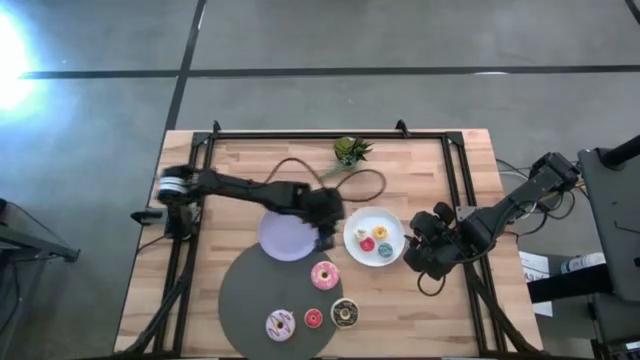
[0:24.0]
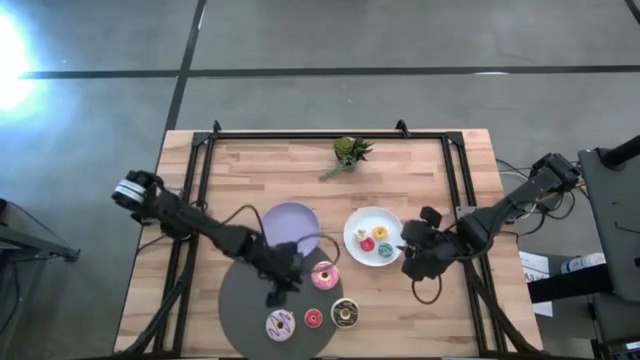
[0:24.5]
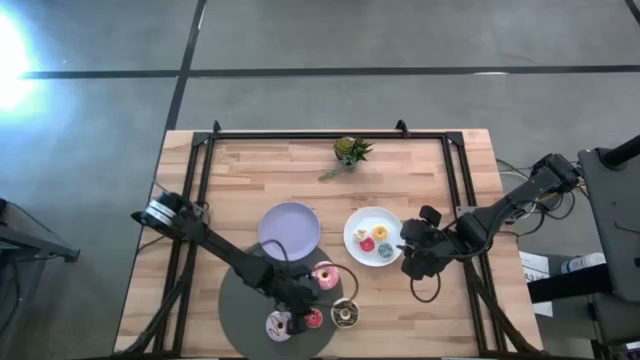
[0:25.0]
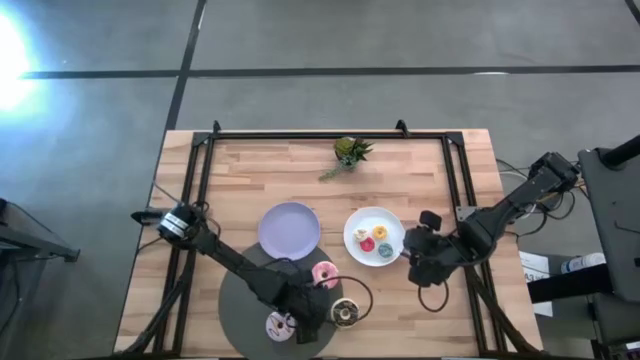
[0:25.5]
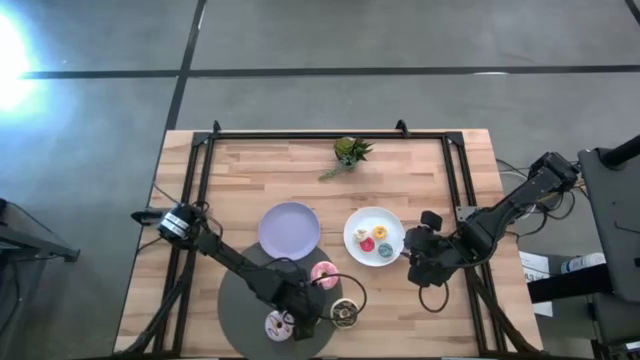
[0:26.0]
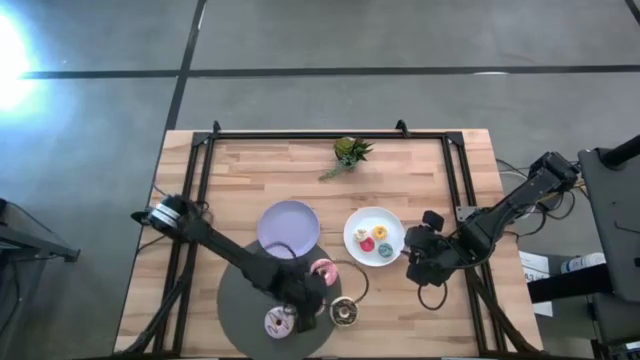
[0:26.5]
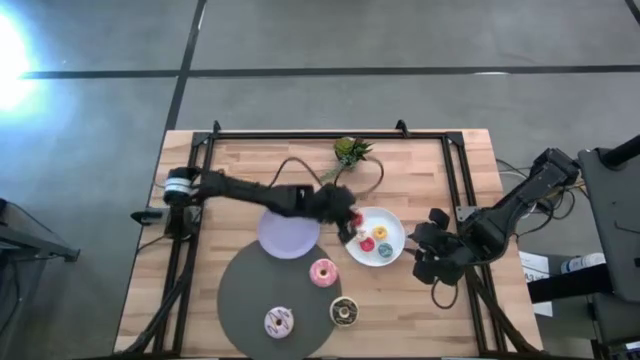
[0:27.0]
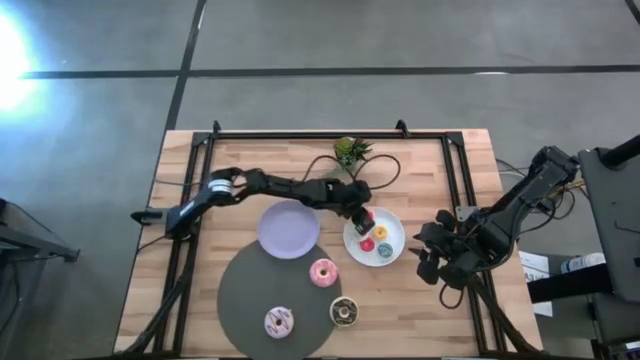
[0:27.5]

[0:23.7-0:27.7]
Task: Pick & Place donuts
Put the small orange donut on the white plate

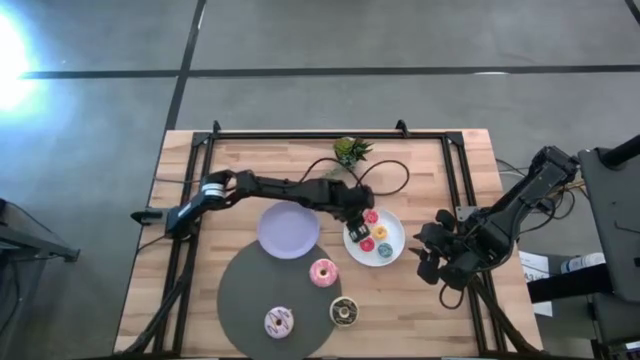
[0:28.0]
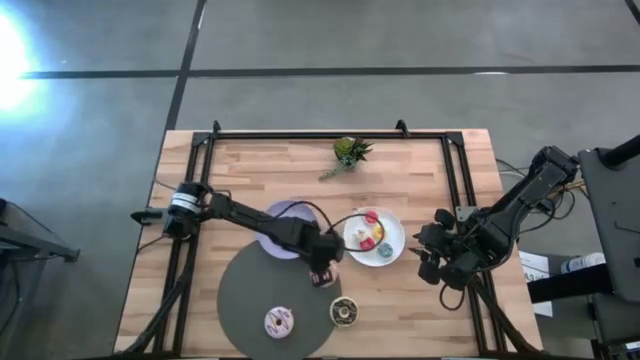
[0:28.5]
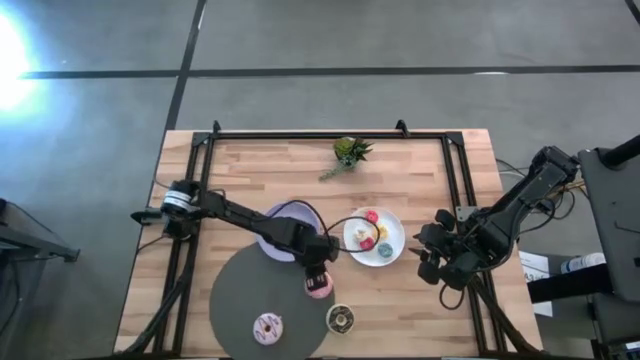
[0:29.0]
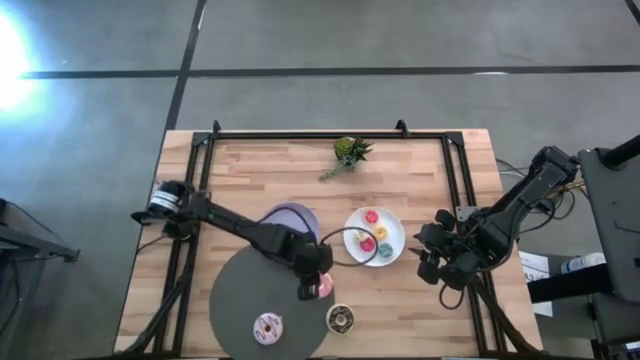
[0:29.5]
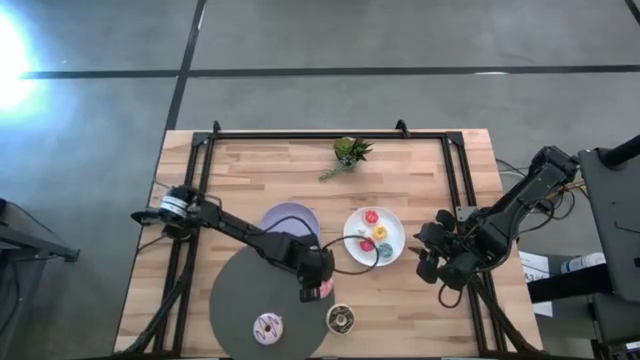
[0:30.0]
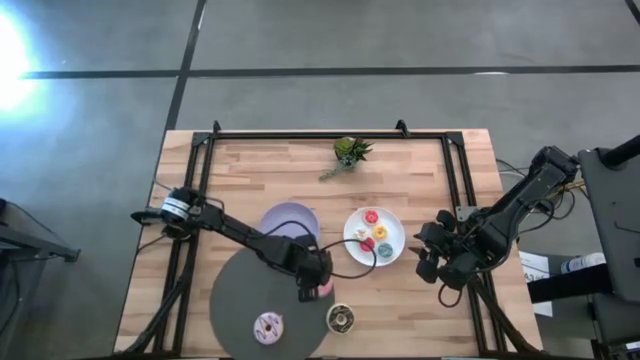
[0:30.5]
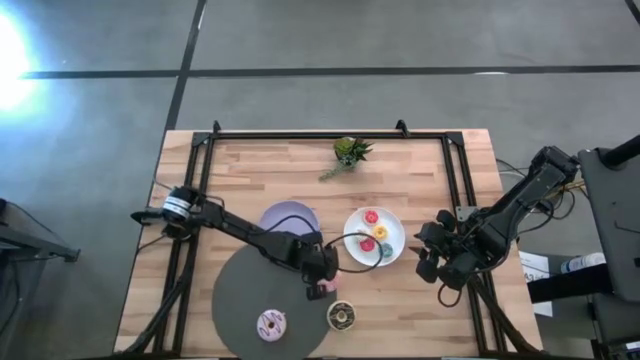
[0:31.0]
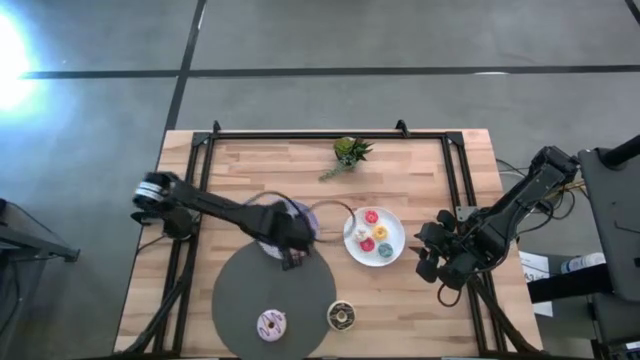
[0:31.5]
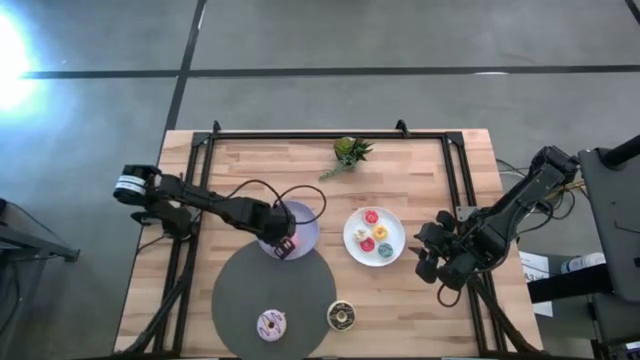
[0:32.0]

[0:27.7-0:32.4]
Put the large pink donut on the purple plate

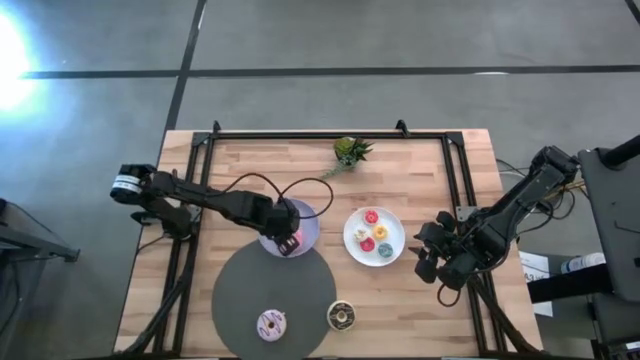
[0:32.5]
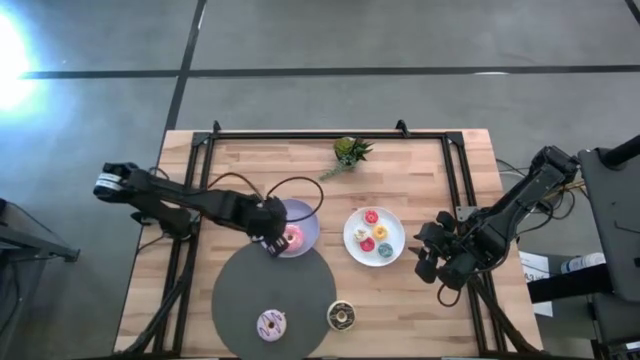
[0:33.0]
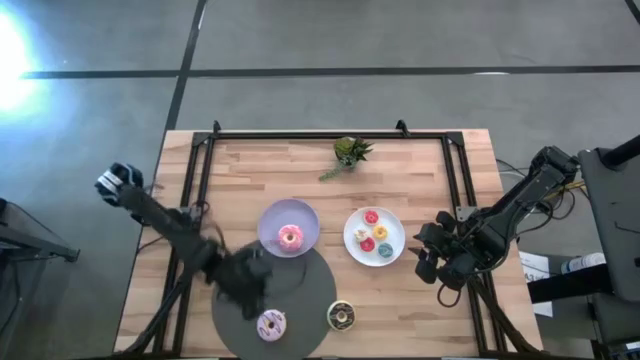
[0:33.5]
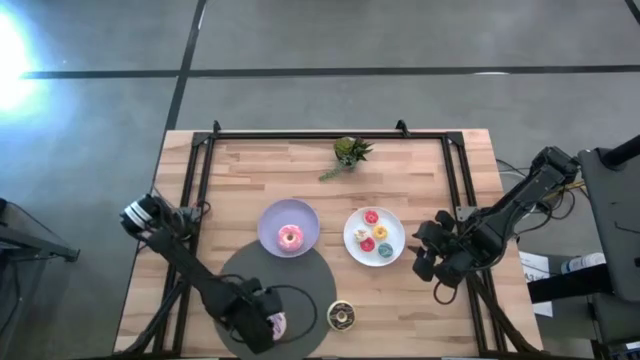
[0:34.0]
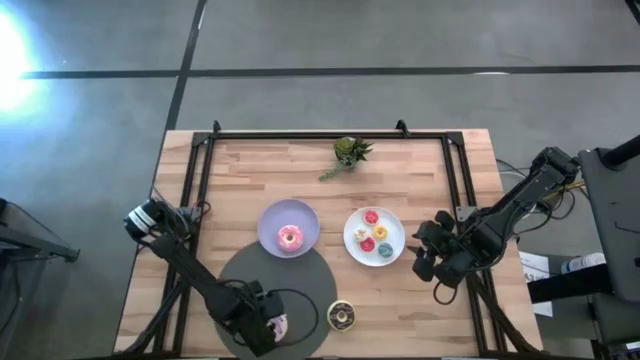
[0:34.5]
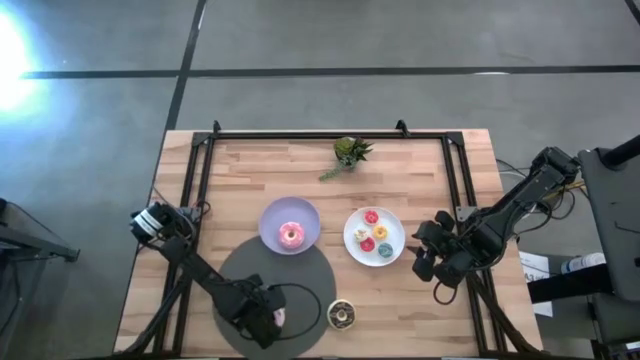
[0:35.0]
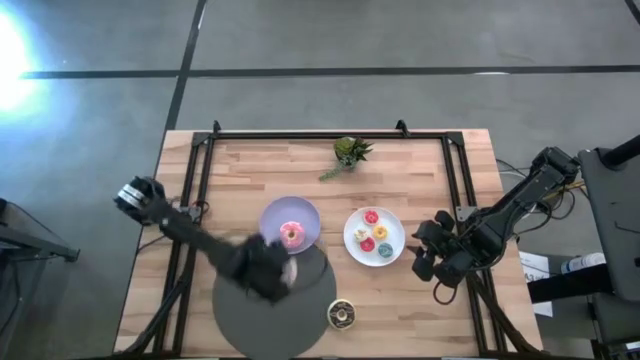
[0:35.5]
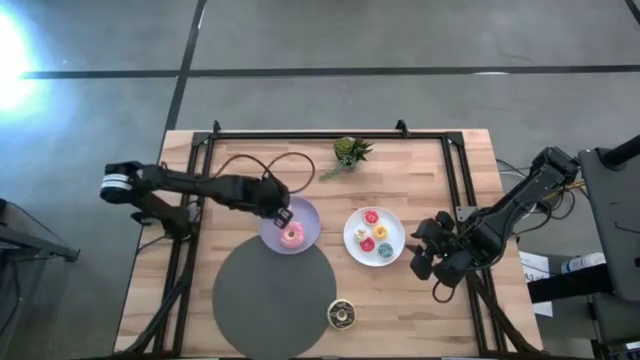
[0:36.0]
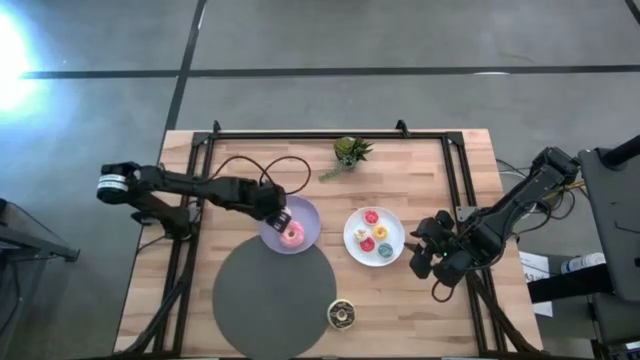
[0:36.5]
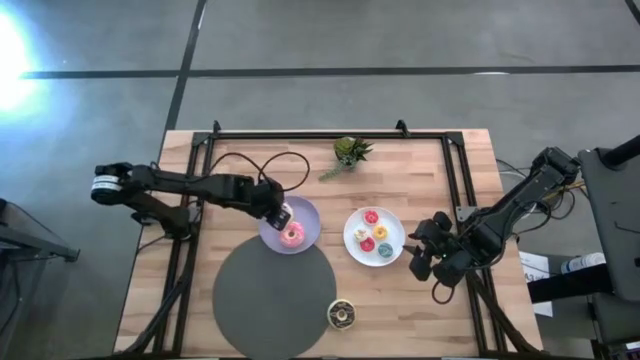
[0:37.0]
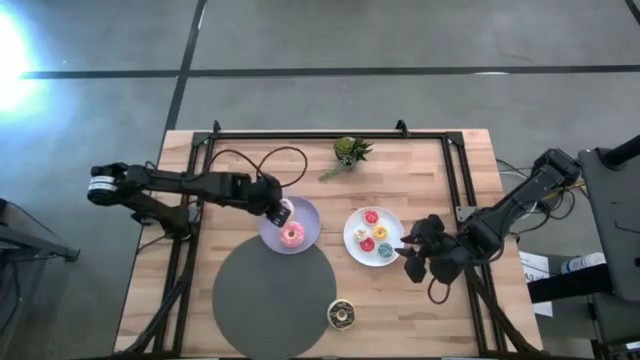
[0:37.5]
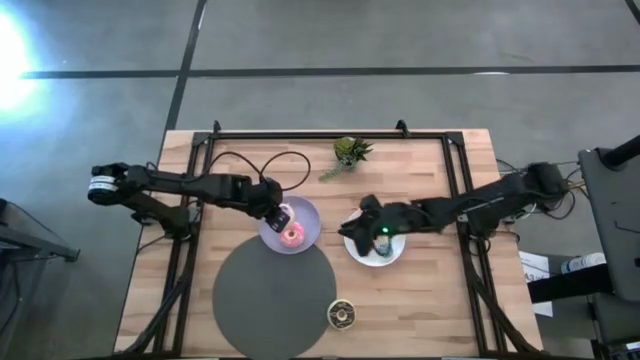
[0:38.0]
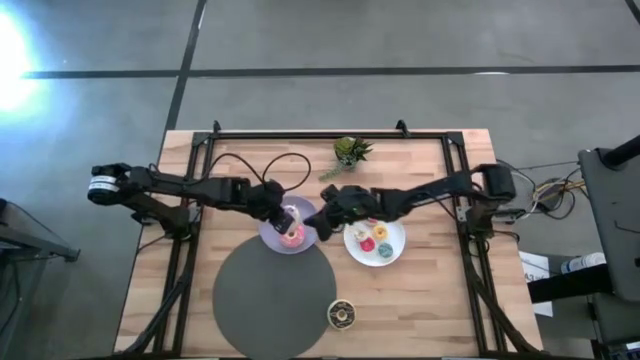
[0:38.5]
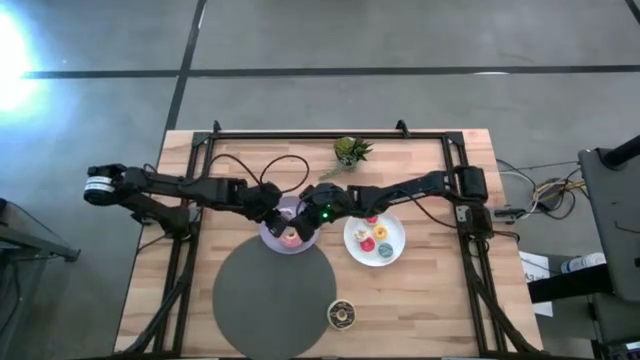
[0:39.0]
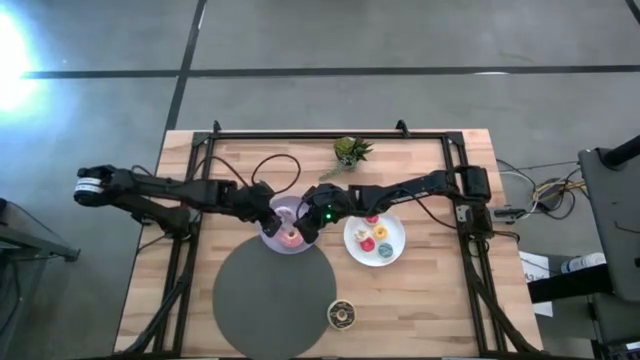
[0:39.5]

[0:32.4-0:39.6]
Put the large purple donut on the purple plate

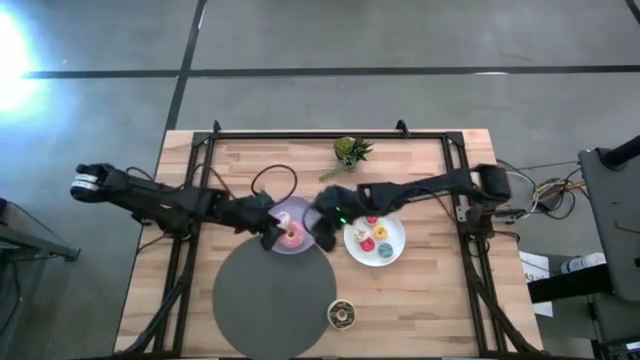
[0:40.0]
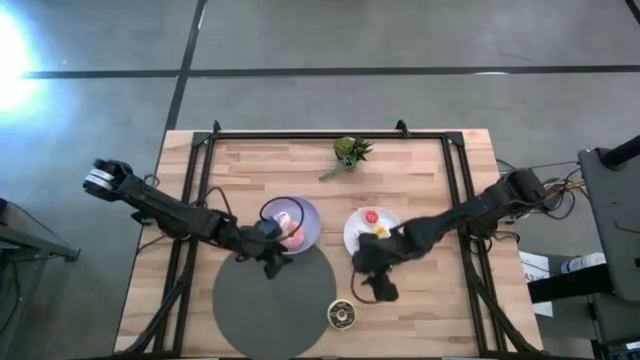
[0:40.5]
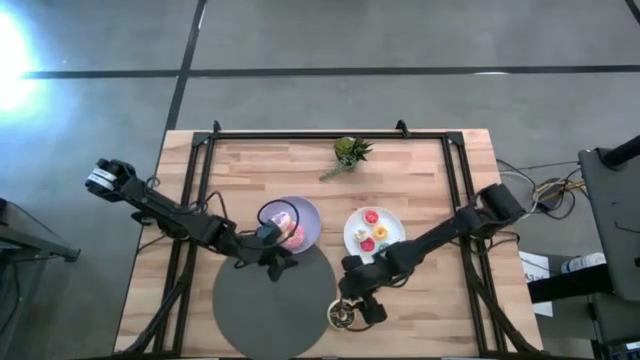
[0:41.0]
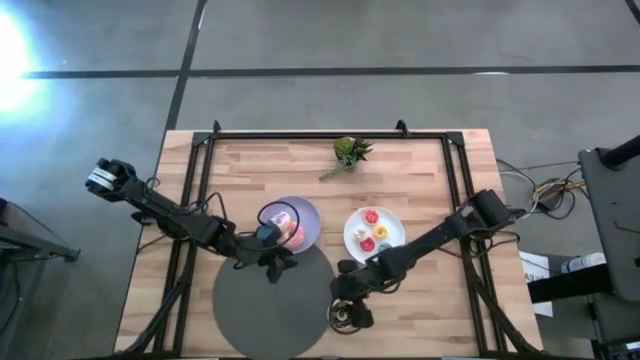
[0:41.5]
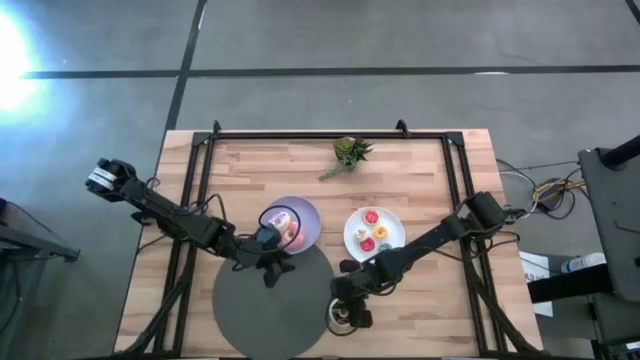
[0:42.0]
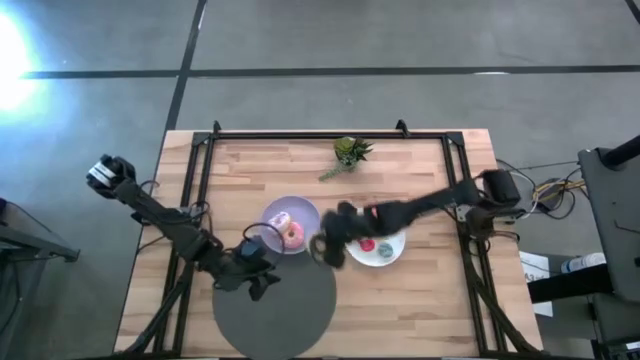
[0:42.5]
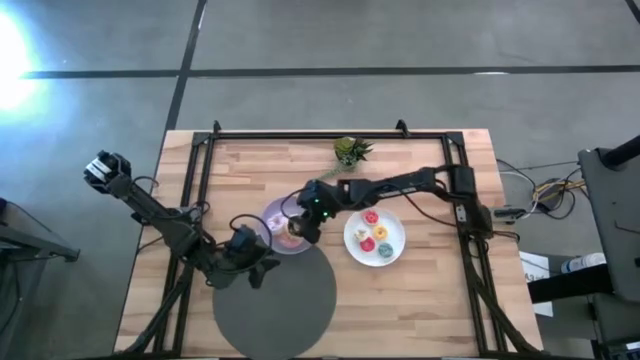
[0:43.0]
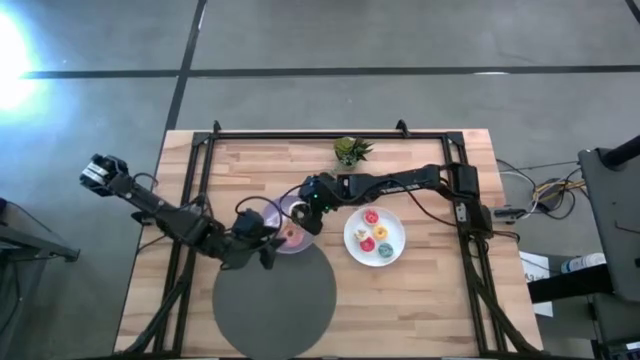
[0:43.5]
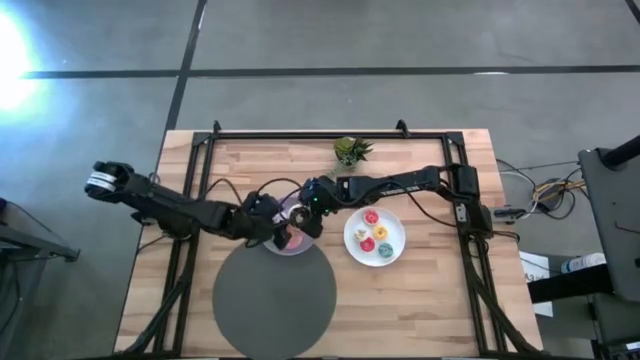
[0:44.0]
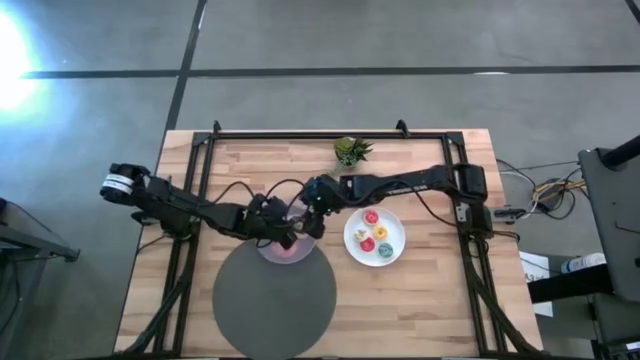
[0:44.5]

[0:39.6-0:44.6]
Put the large black donut on the purple plate

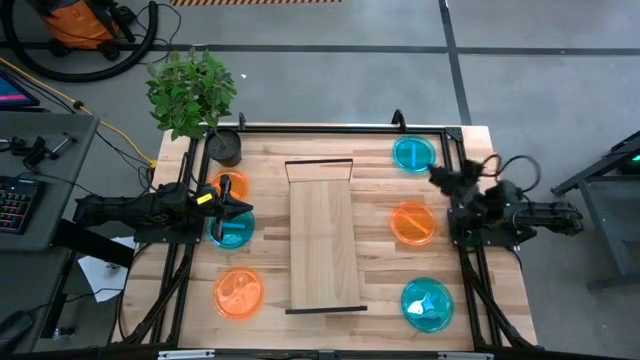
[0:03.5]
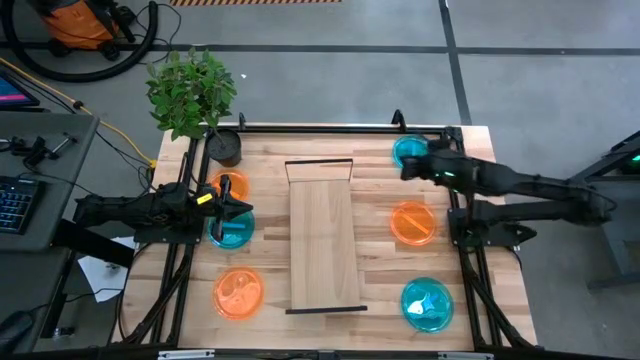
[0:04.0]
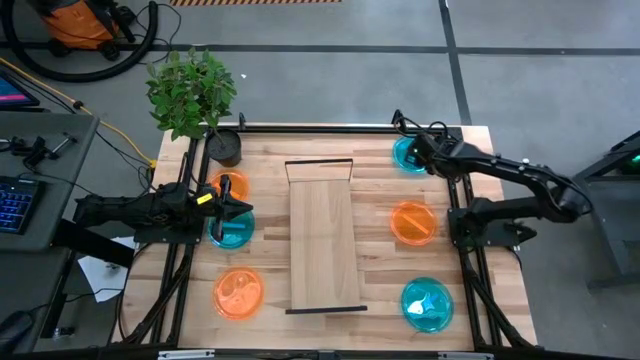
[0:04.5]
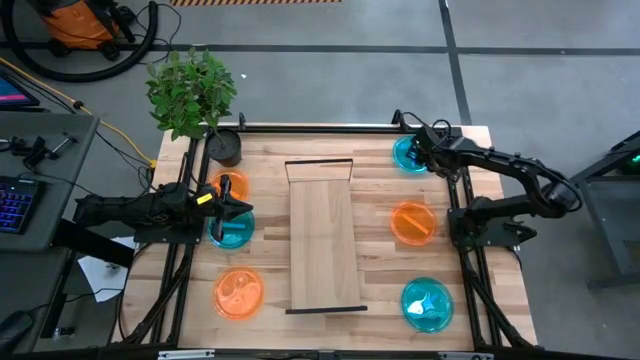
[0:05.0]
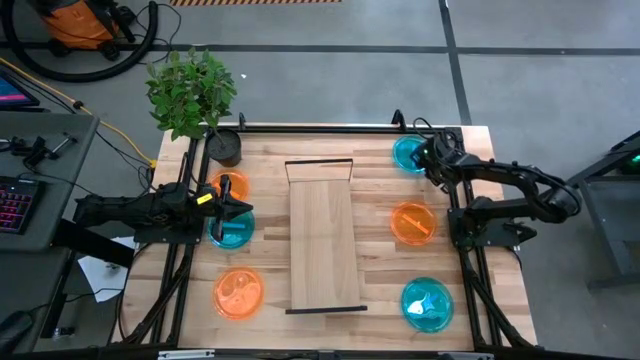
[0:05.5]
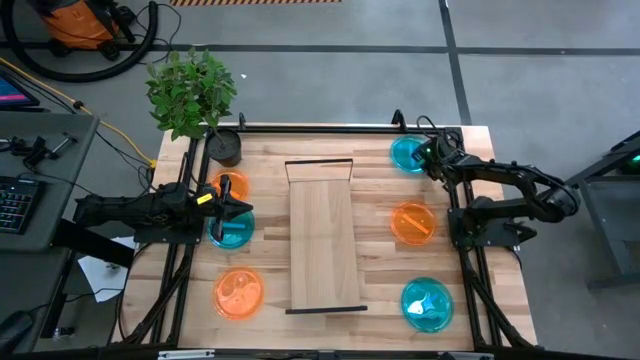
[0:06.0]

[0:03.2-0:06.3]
Task: Place and stack plates onto a shelf
Put top right blue transparent plate on the shelf
